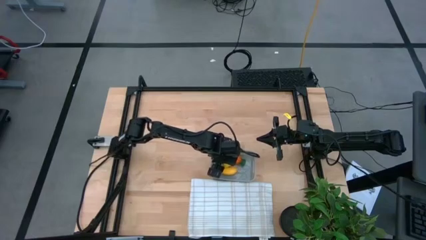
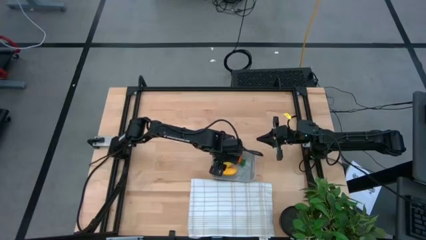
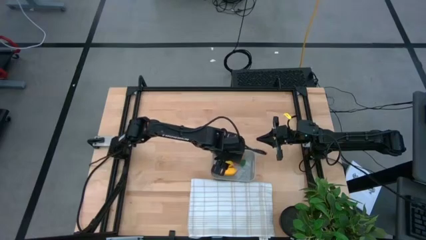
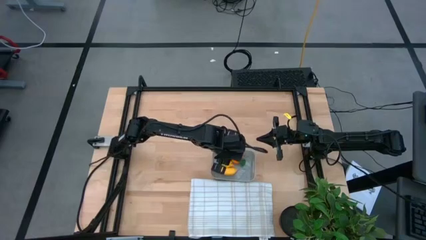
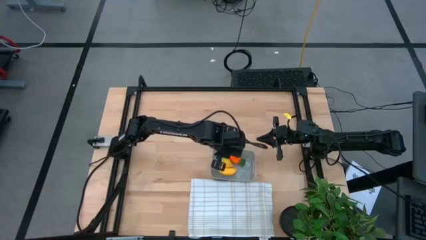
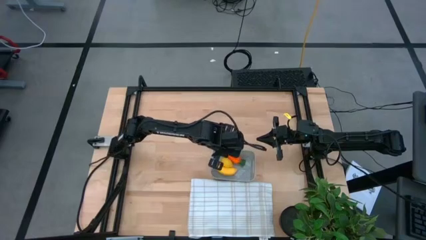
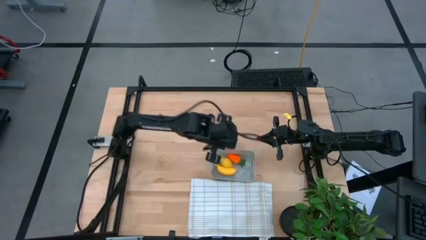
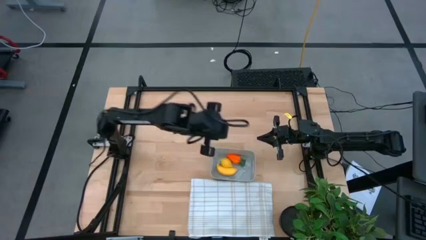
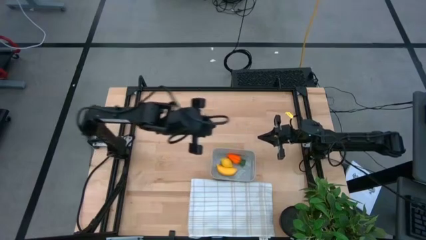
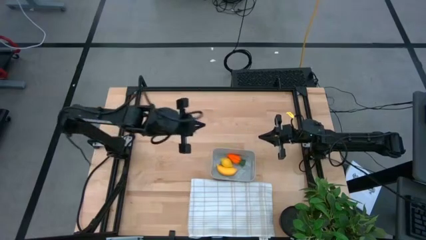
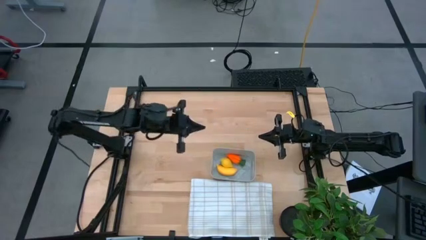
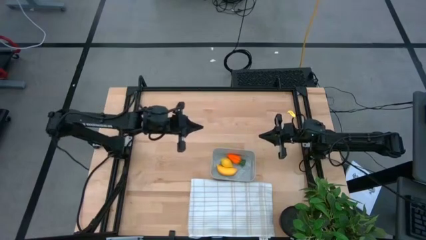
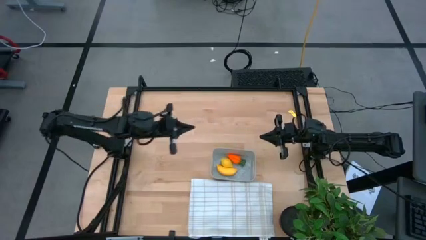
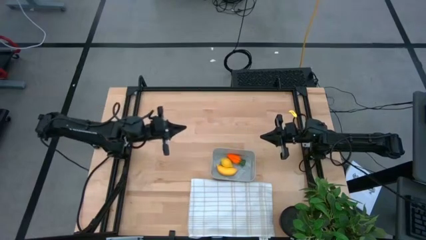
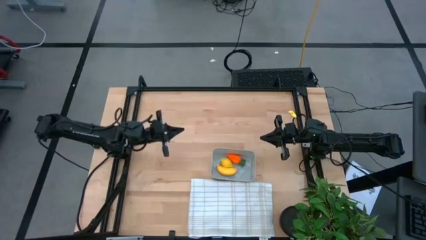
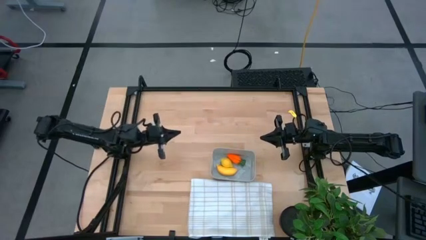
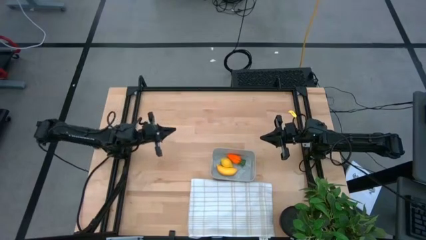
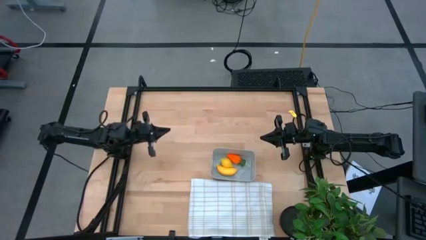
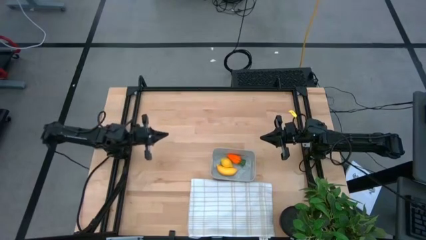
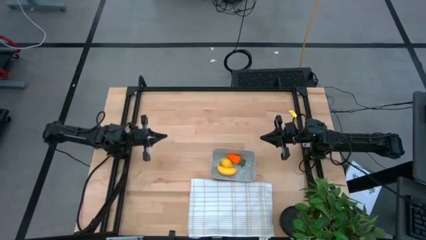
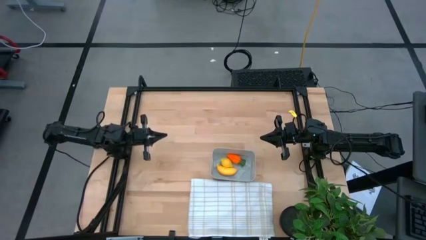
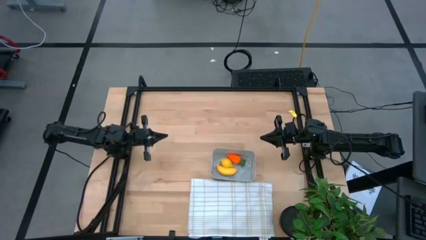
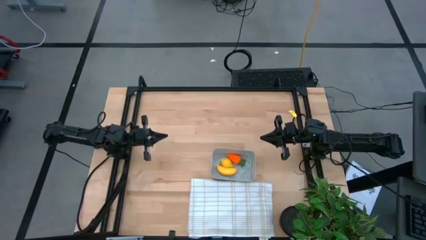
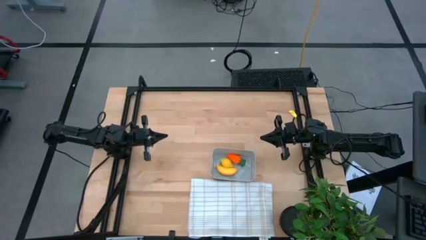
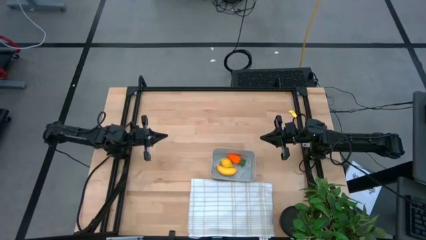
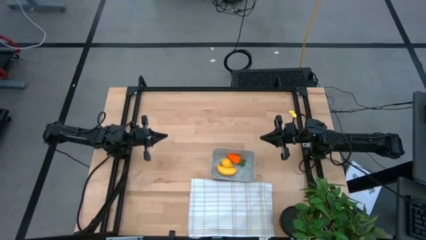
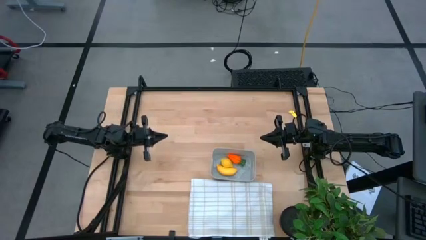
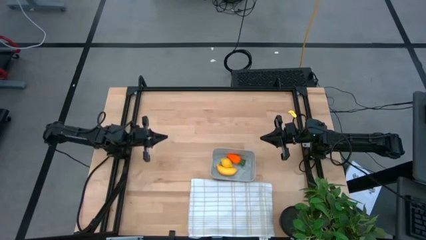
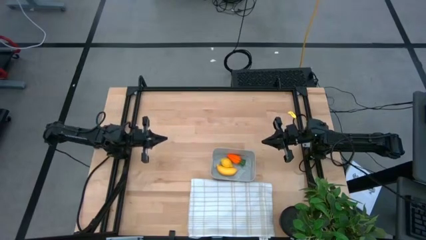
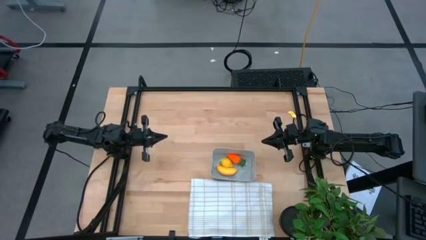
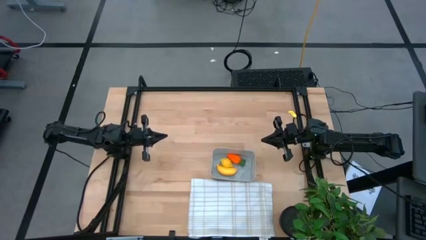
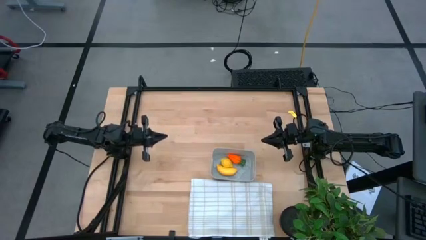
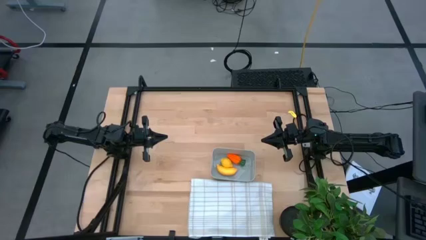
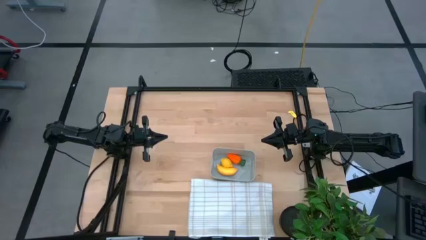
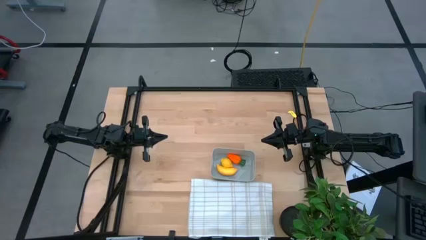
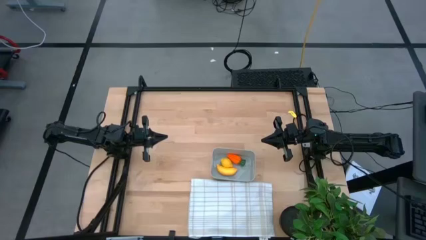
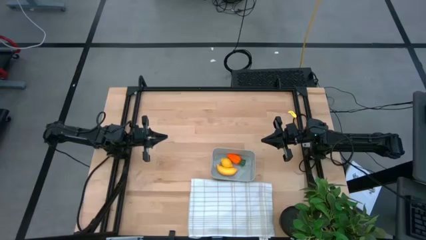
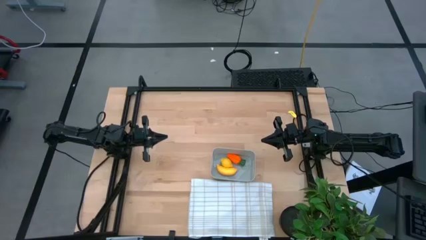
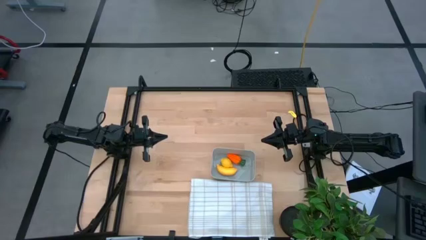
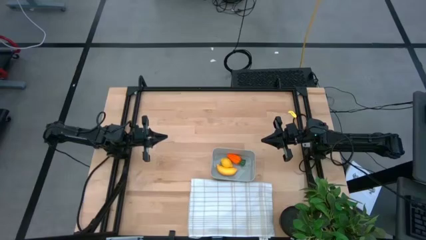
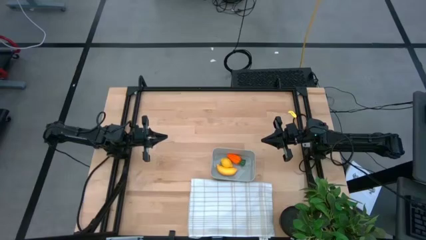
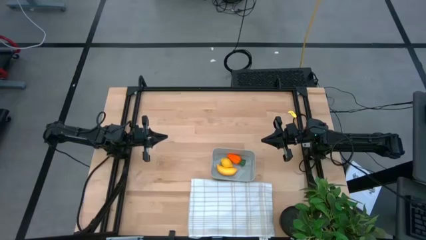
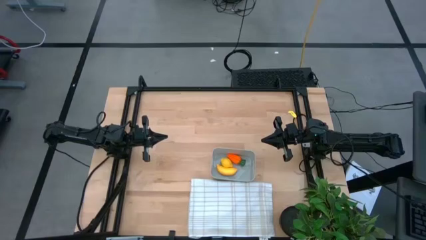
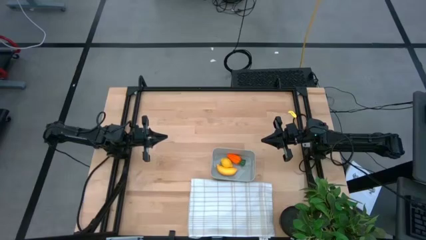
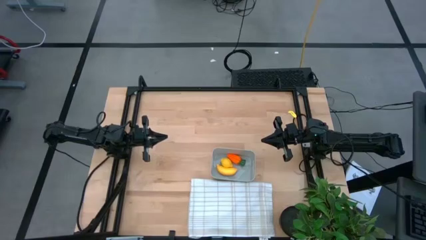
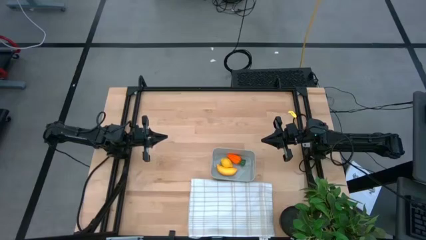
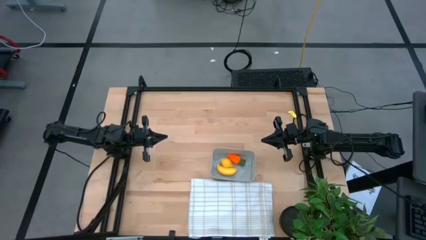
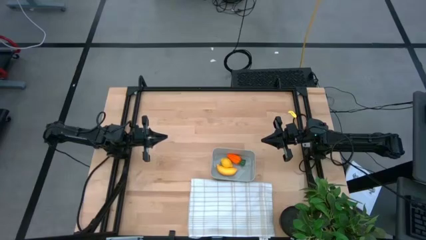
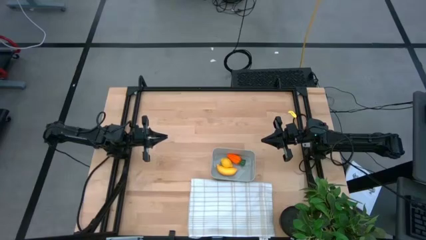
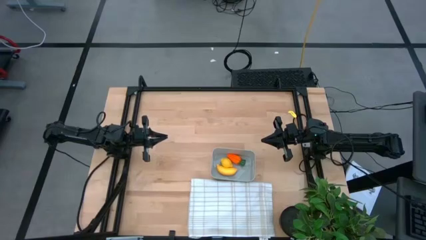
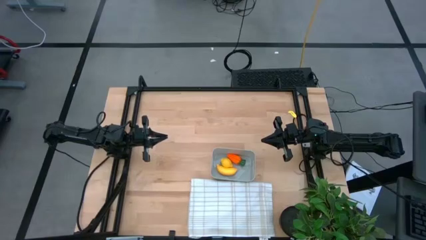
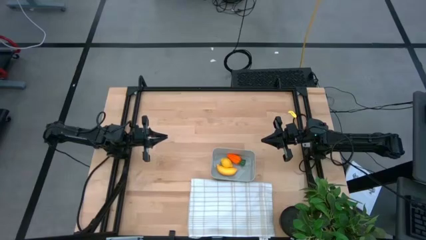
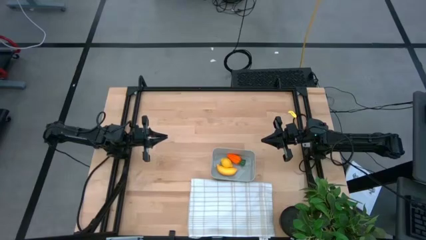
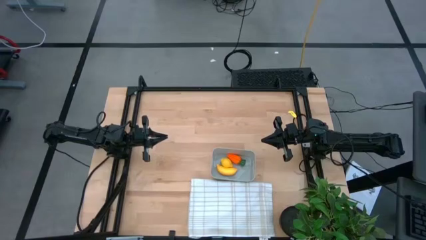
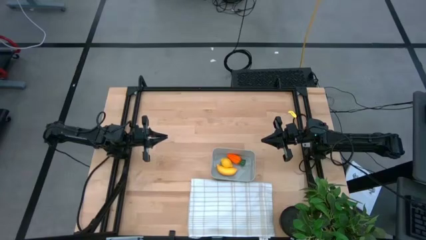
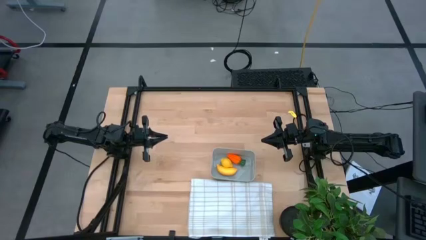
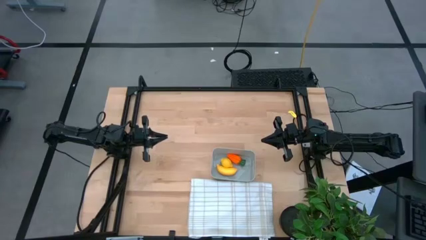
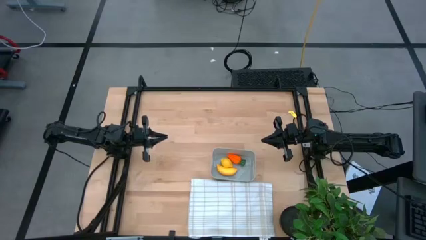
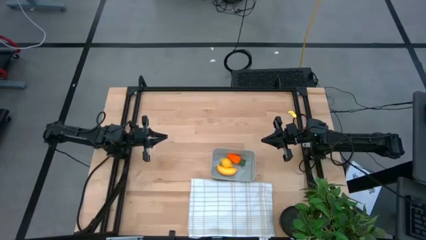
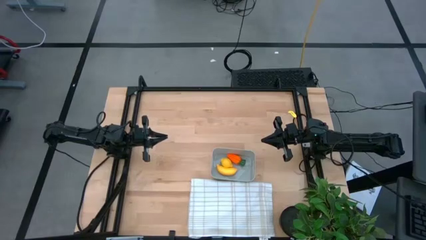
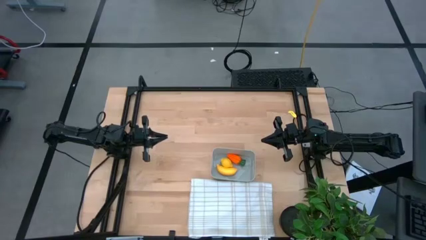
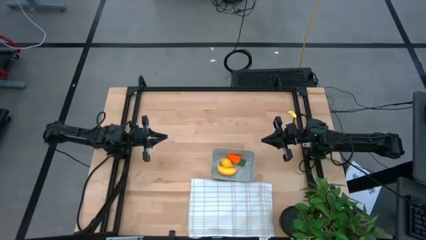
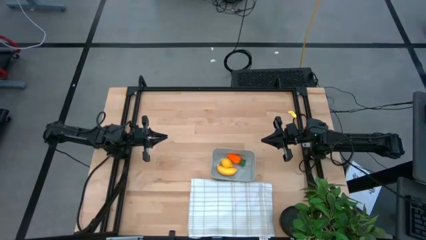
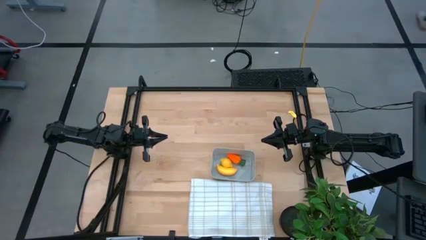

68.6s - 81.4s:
Task: Pick and placing Produce into tupperware
Return to Home Position
